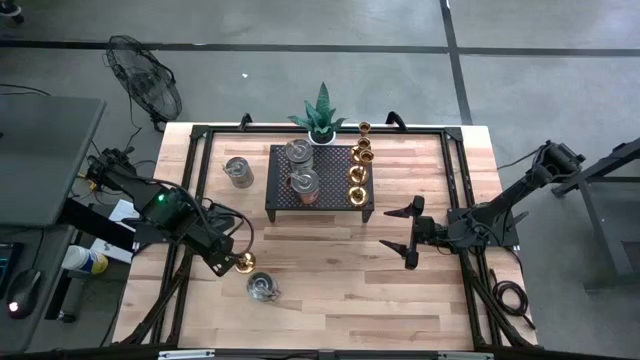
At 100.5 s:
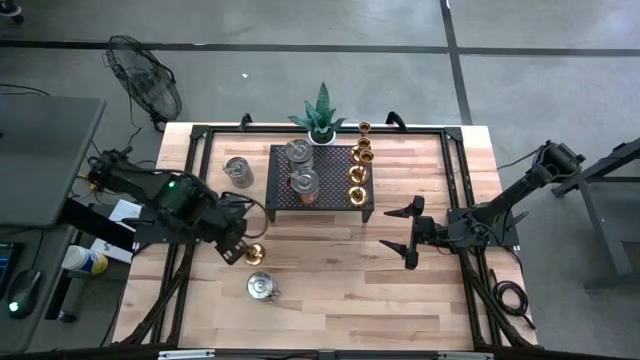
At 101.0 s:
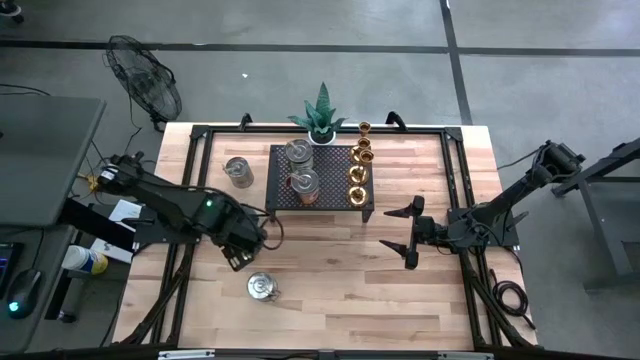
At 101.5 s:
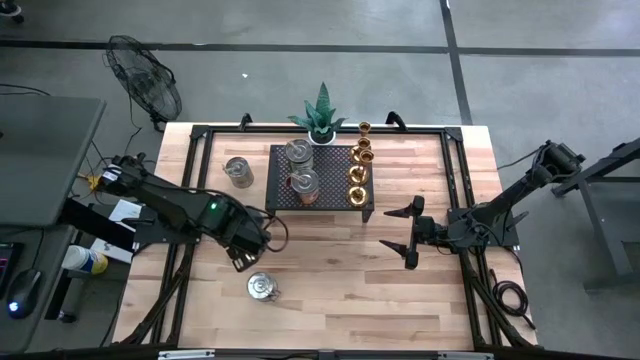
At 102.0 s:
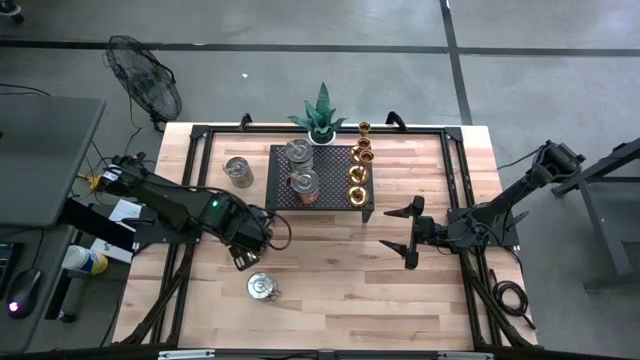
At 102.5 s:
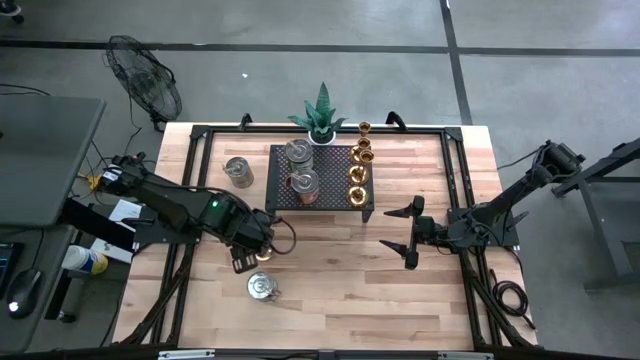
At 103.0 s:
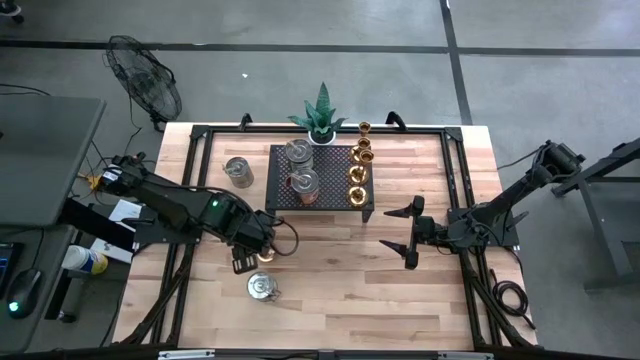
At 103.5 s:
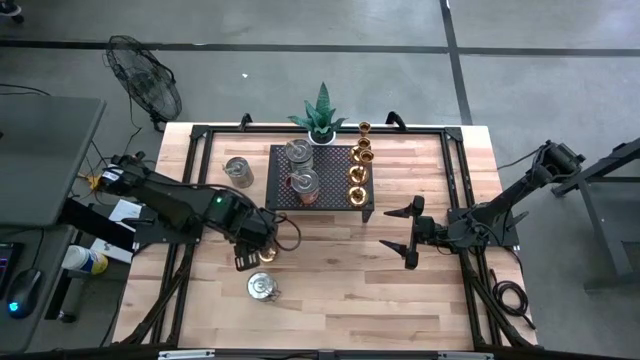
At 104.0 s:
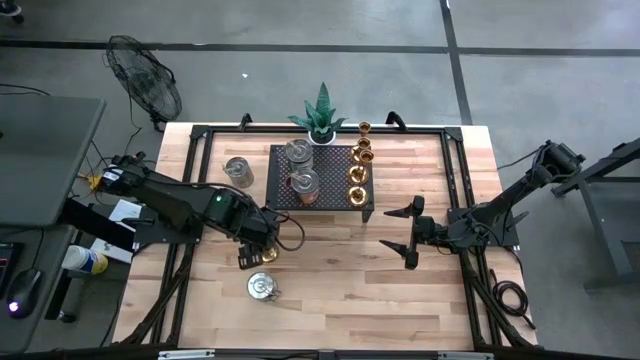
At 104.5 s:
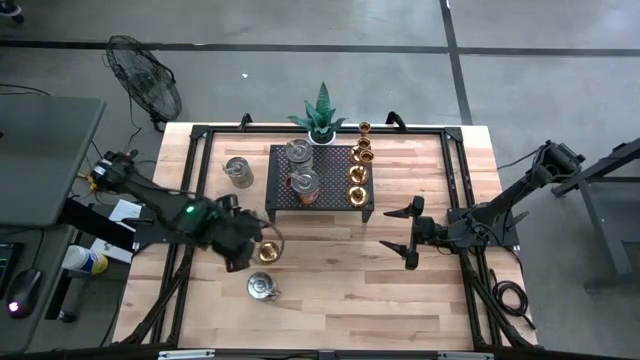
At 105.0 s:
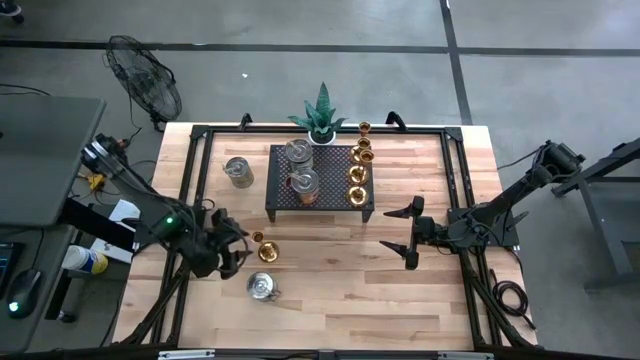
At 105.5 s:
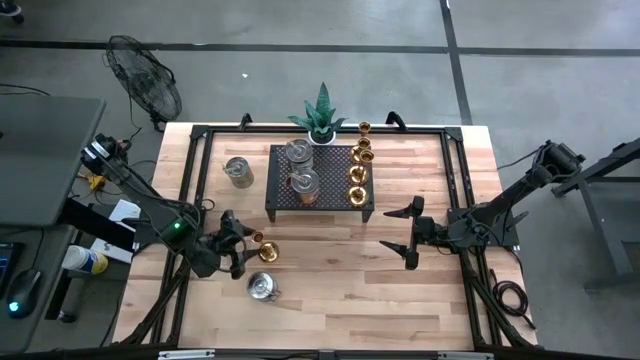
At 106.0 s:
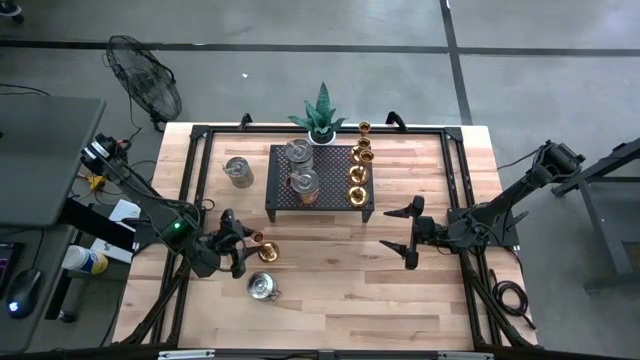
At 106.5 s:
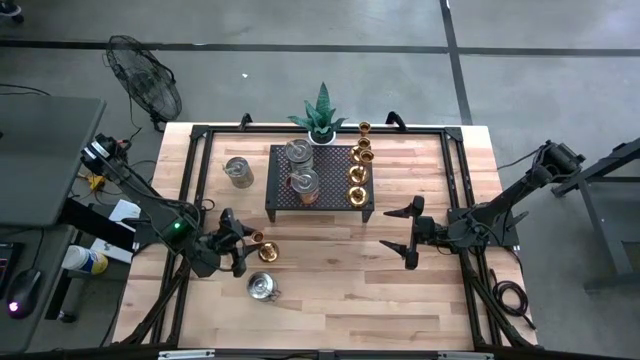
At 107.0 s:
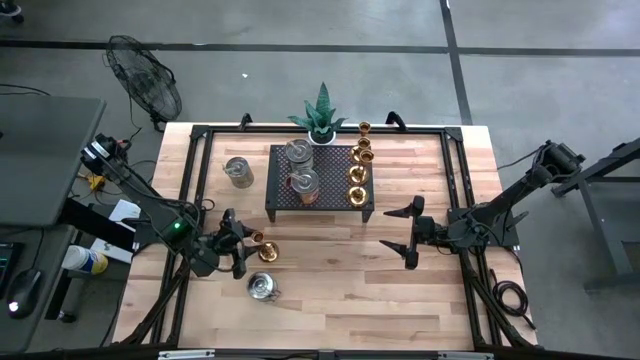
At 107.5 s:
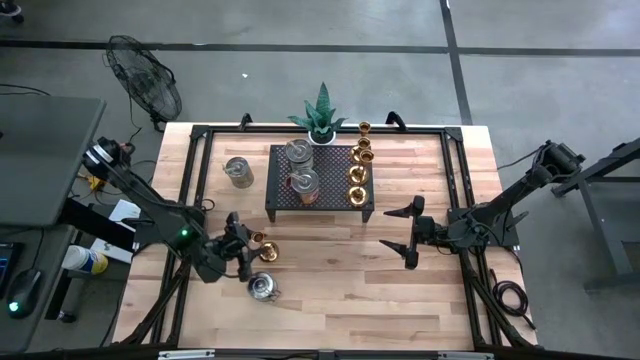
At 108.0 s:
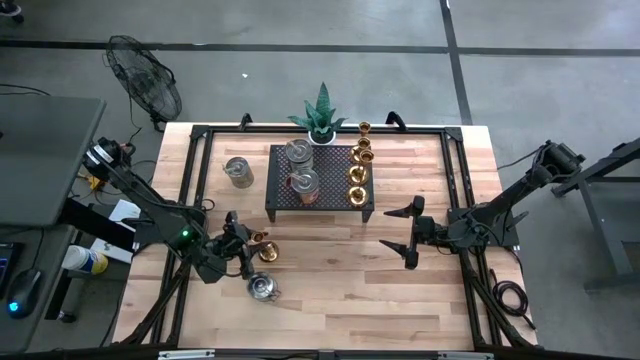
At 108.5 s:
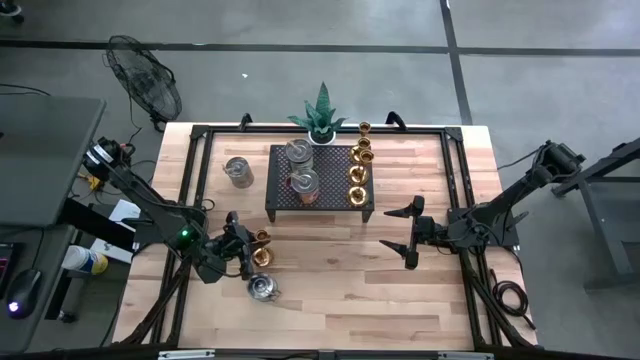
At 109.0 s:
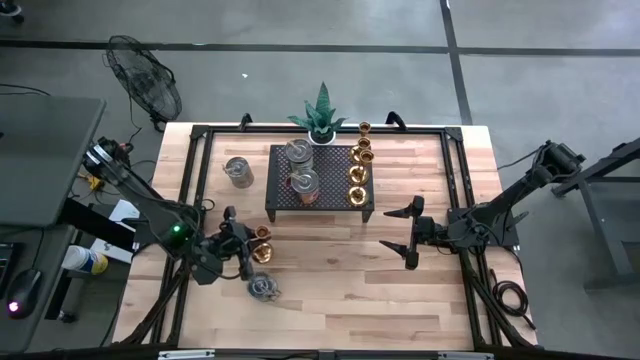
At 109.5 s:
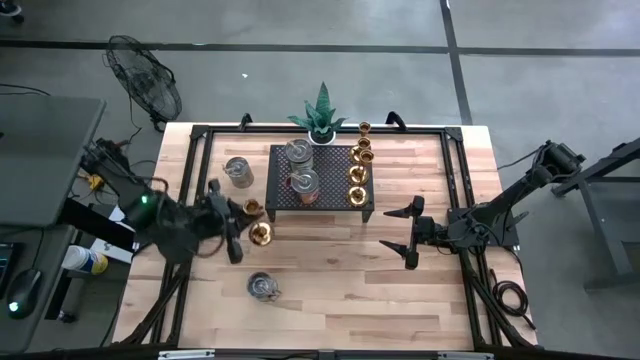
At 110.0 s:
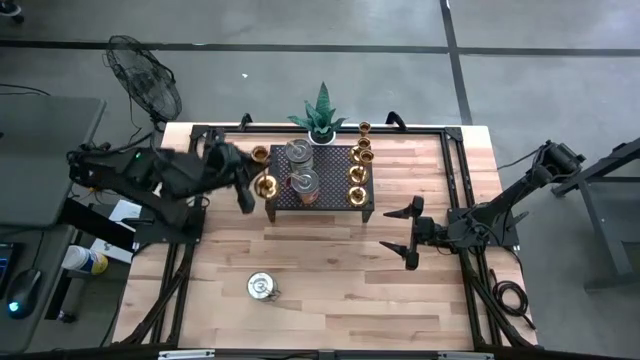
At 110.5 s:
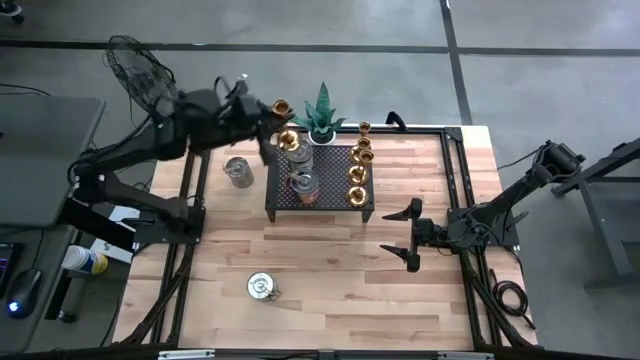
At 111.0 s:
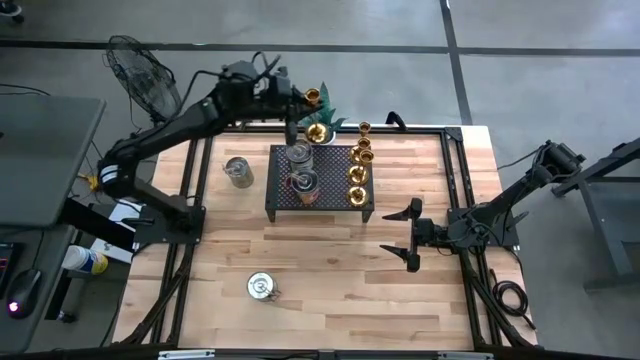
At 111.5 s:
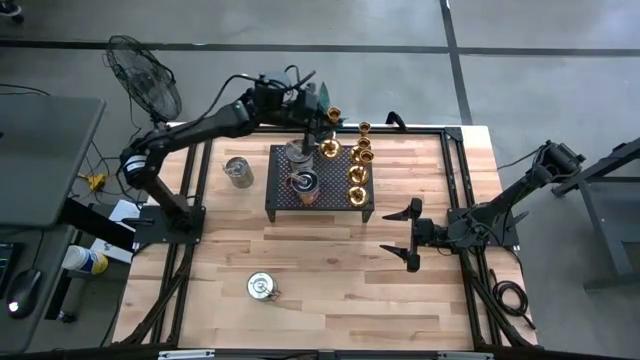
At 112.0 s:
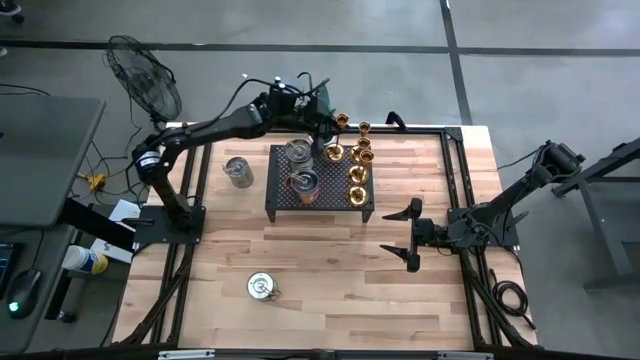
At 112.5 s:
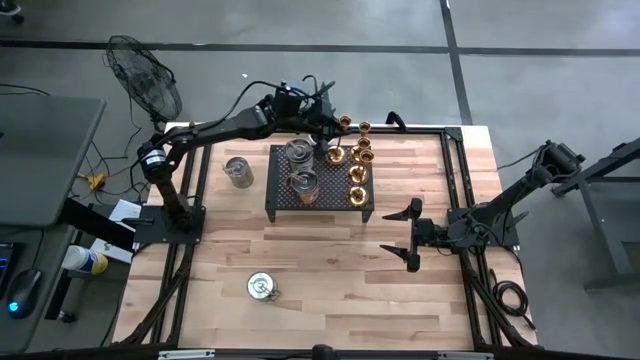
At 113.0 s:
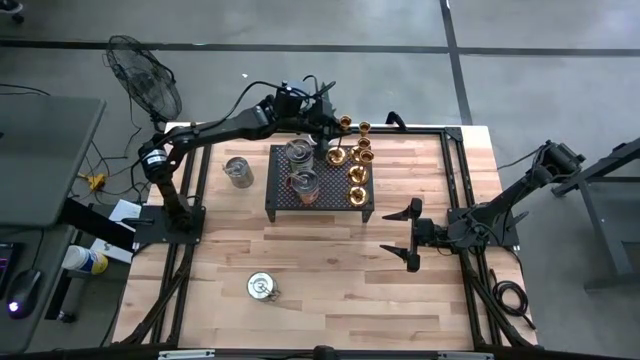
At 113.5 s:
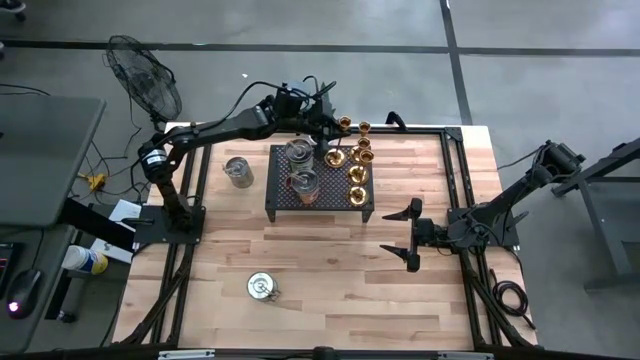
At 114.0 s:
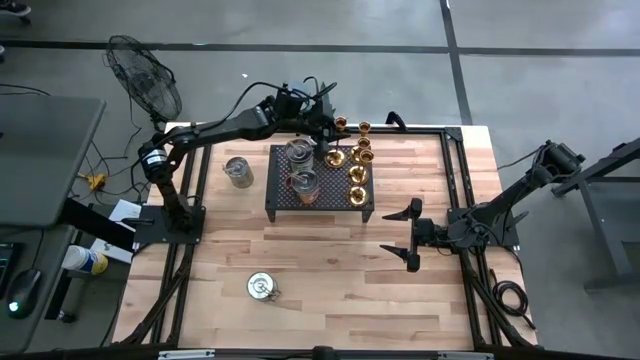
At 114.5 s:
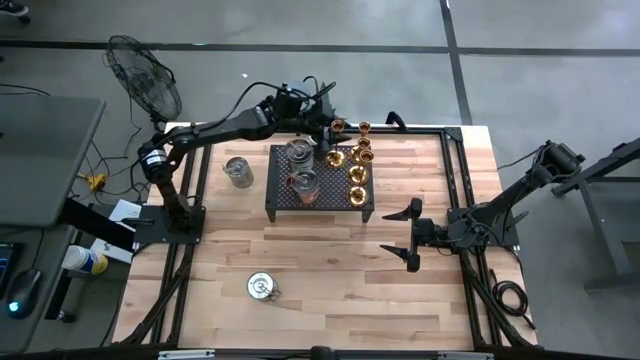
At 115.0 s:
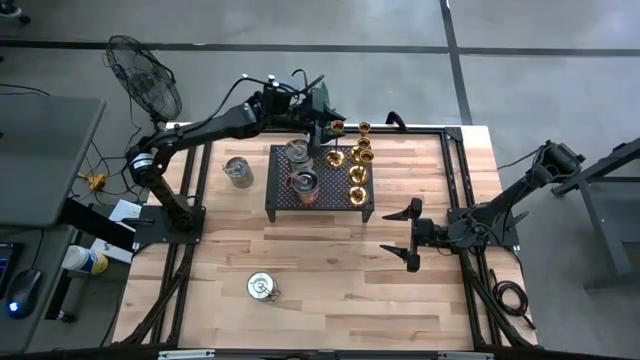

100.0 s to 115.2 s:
Task: Pick & Place candle stick holders
Put the gold candle holder on the shelf

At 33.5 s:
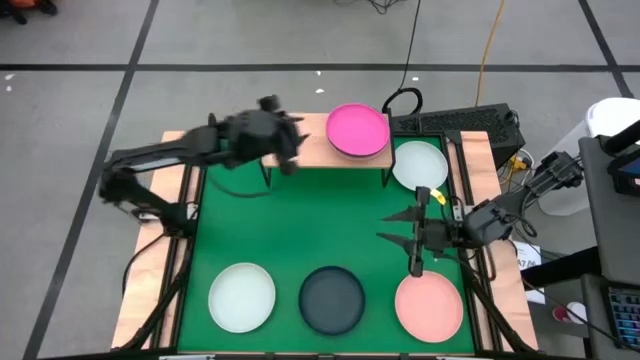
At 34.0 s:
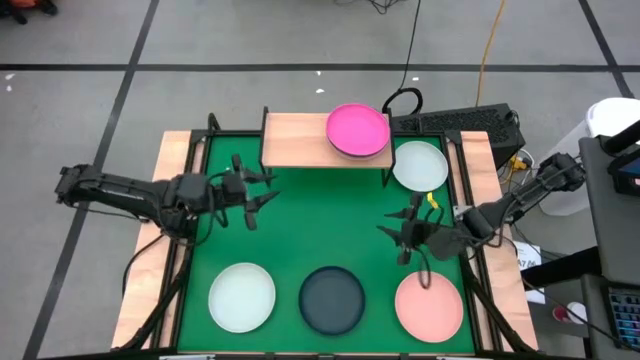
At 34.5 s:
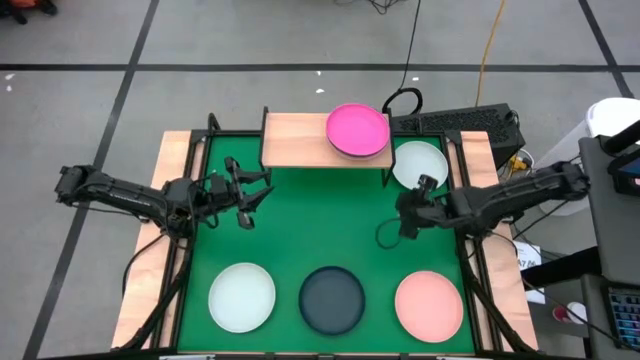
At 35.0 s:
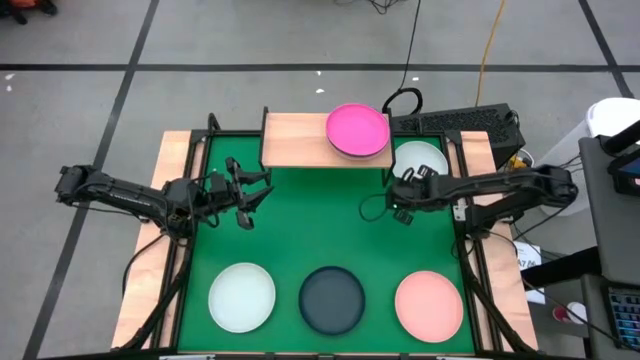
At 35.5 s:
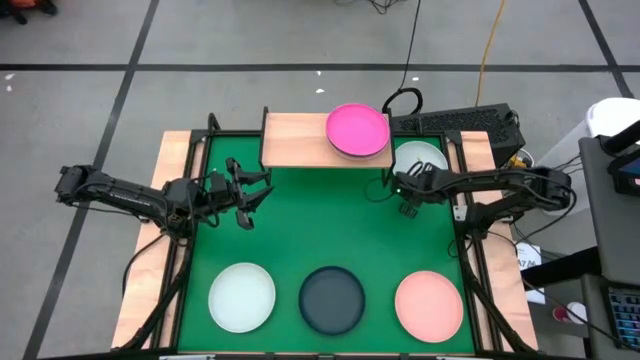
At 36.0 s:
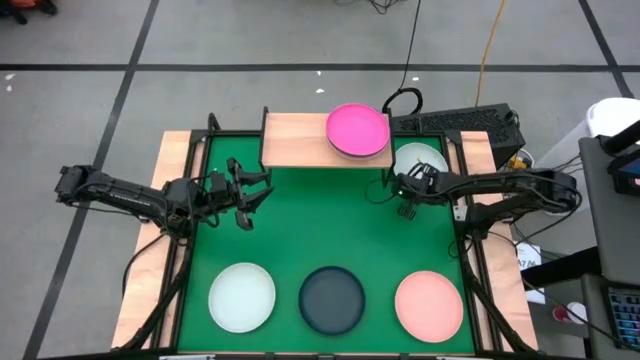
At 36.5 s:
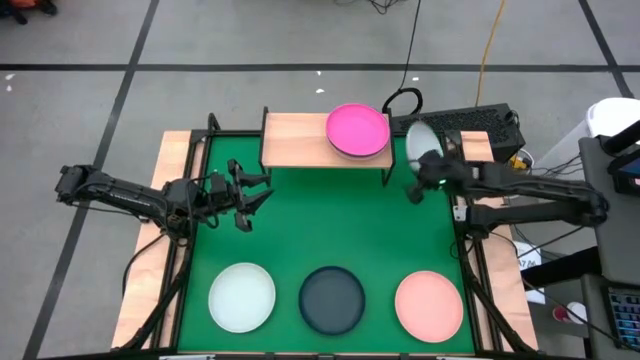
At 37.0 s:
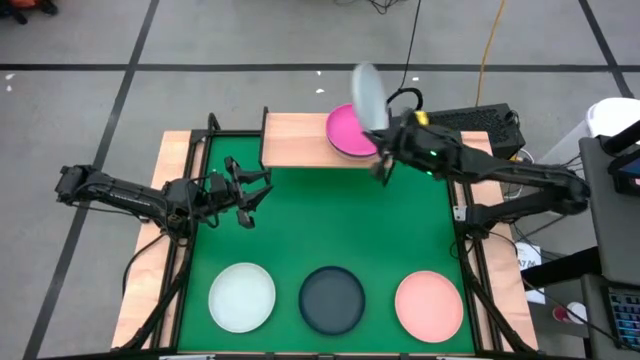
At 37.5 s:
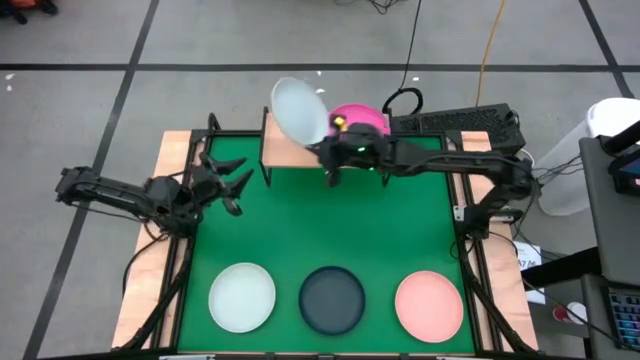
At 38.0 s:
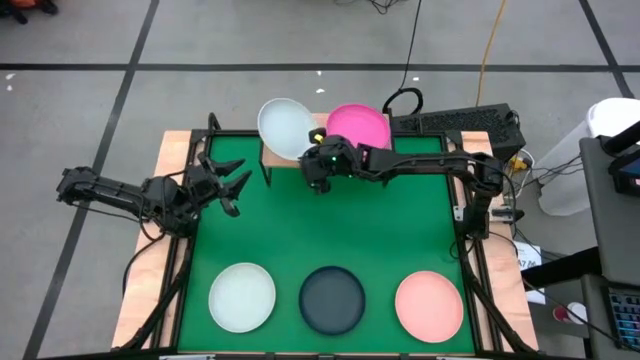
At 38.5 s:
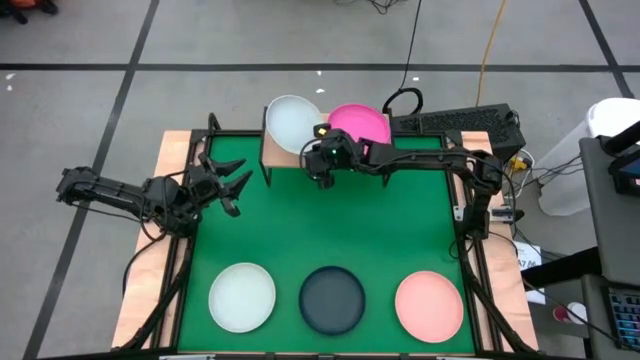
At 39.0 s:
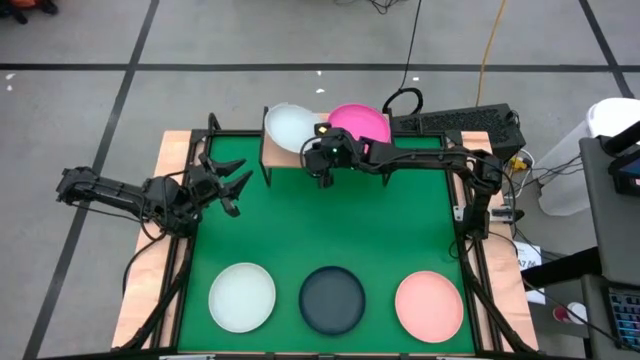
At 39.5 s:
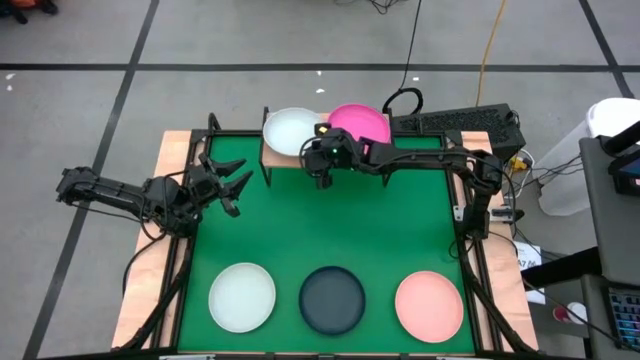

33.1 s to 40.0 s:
Task: Place and stack plates onto a shelf
Put the white plate on the shelf
